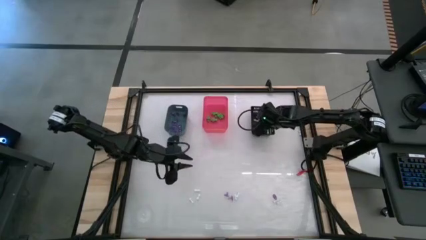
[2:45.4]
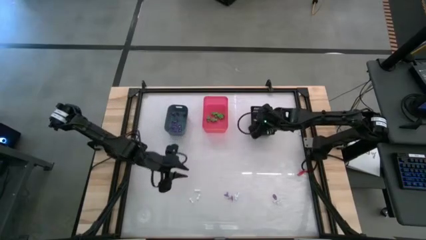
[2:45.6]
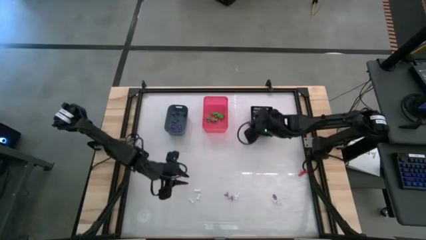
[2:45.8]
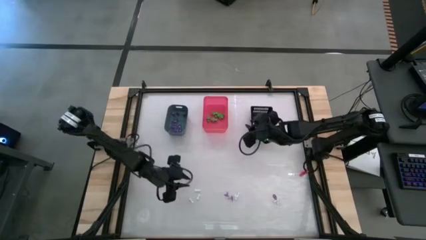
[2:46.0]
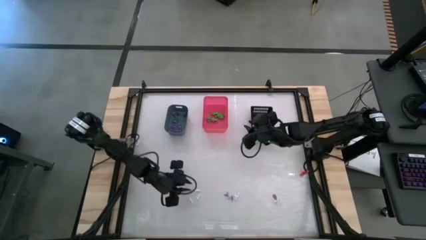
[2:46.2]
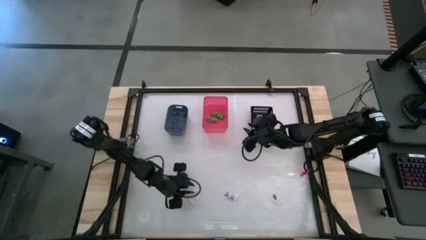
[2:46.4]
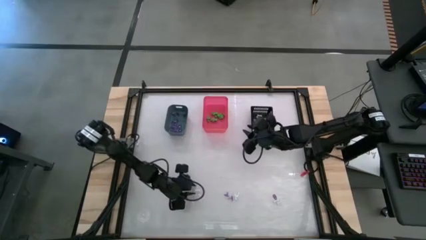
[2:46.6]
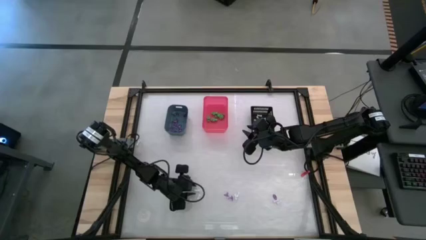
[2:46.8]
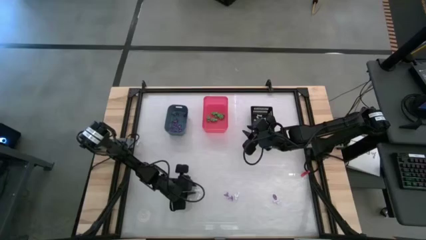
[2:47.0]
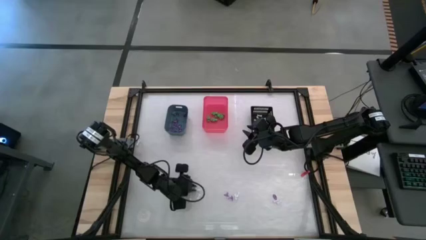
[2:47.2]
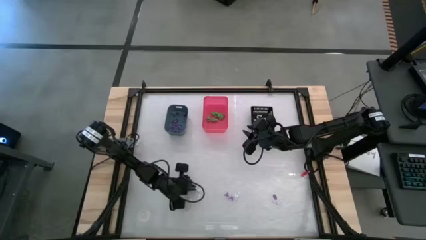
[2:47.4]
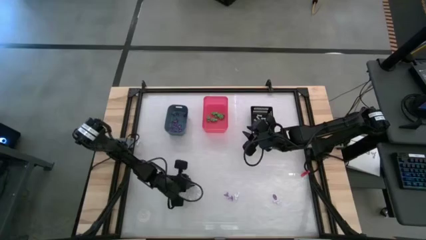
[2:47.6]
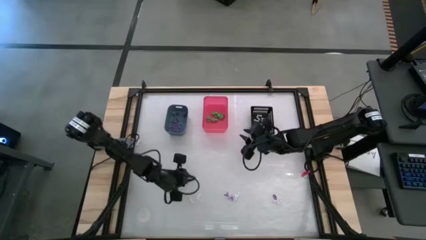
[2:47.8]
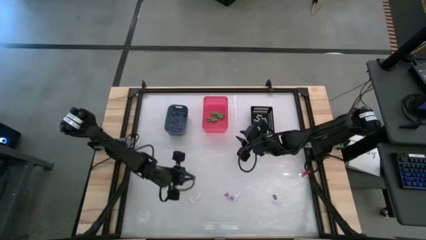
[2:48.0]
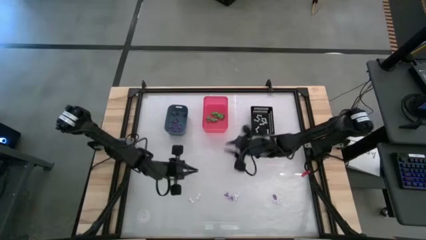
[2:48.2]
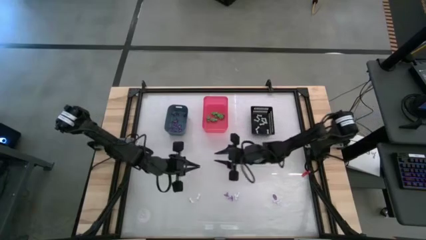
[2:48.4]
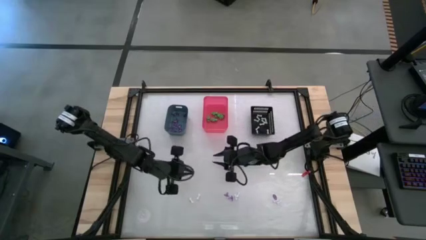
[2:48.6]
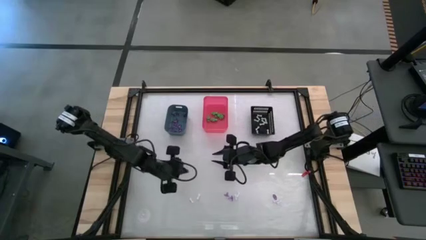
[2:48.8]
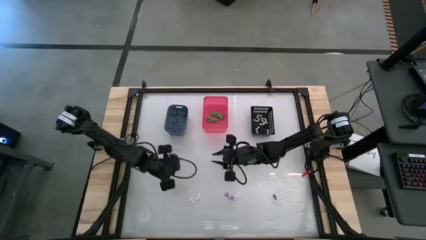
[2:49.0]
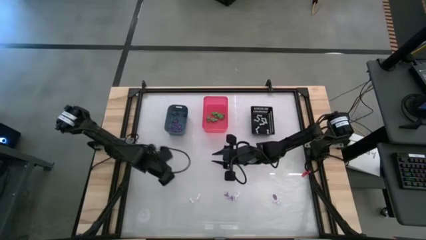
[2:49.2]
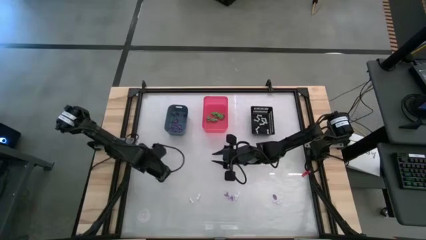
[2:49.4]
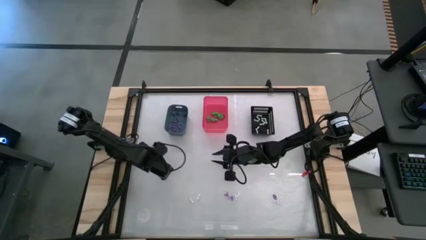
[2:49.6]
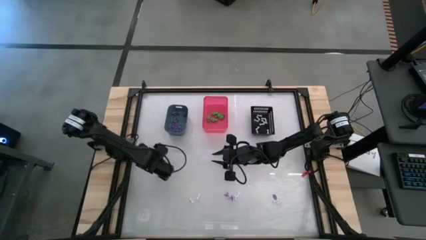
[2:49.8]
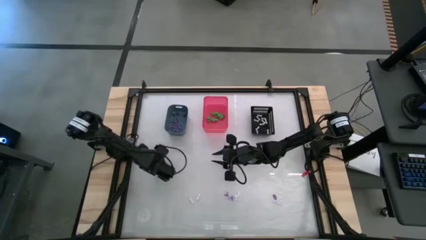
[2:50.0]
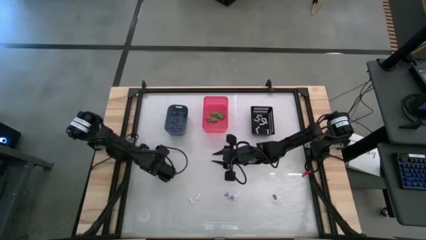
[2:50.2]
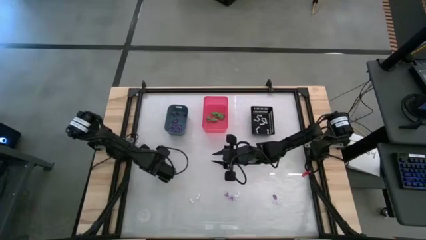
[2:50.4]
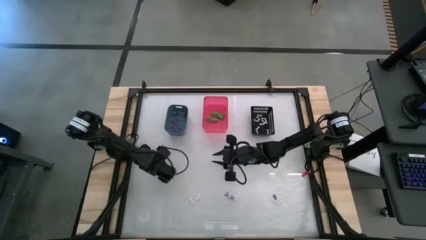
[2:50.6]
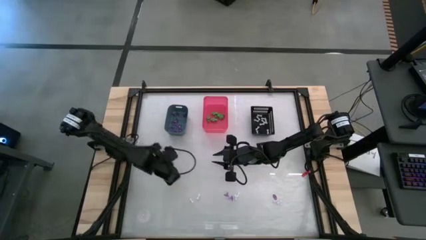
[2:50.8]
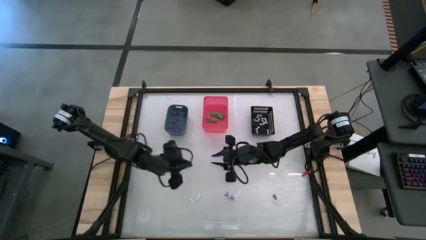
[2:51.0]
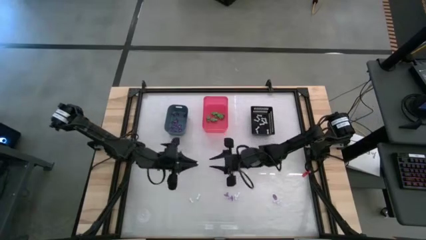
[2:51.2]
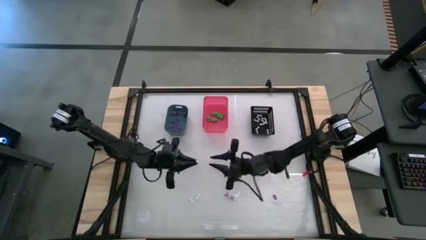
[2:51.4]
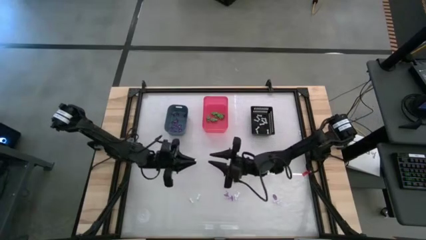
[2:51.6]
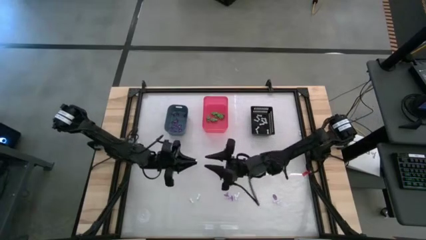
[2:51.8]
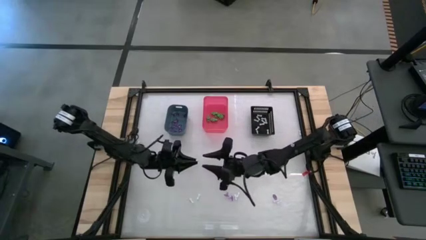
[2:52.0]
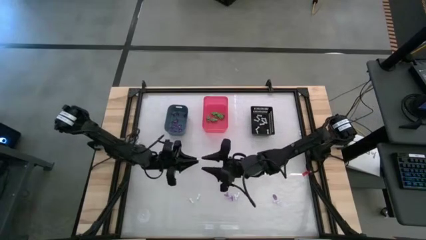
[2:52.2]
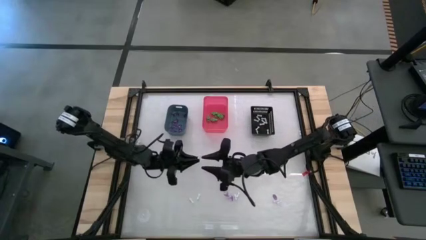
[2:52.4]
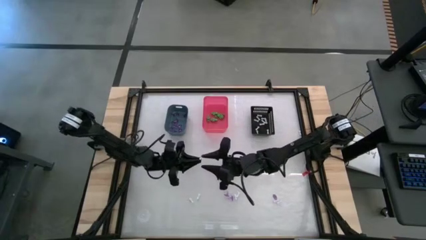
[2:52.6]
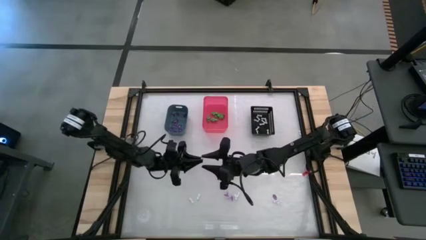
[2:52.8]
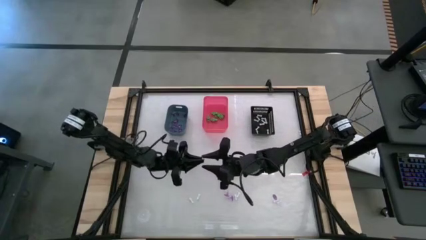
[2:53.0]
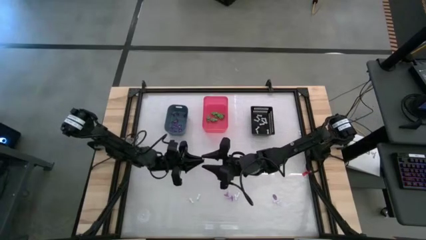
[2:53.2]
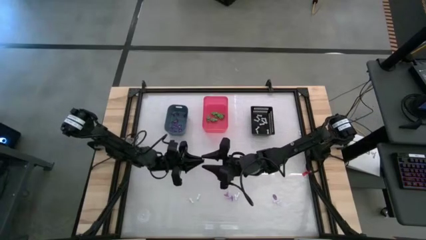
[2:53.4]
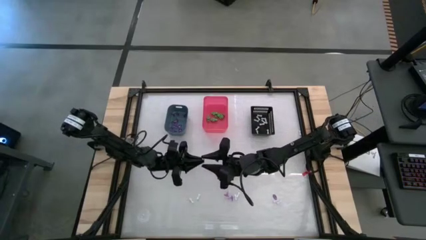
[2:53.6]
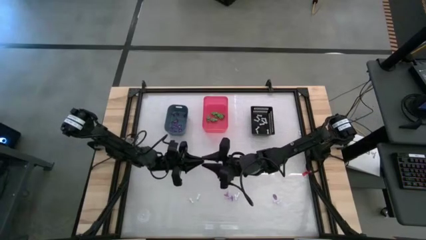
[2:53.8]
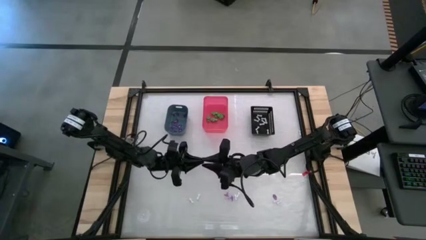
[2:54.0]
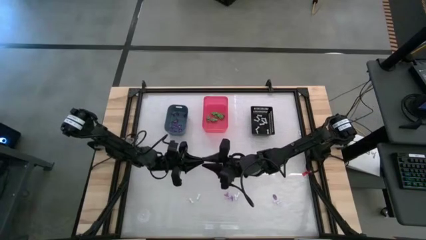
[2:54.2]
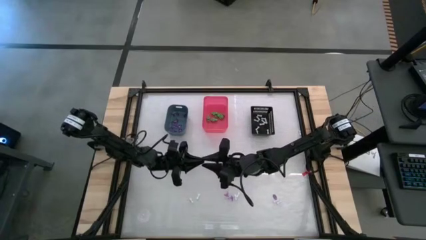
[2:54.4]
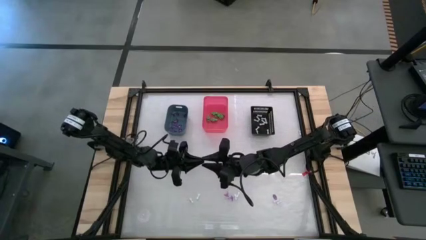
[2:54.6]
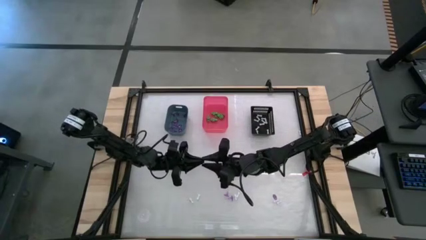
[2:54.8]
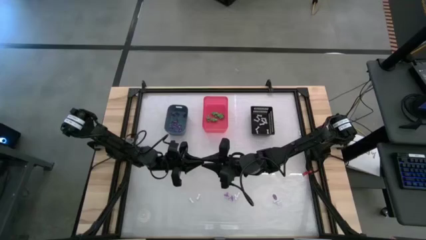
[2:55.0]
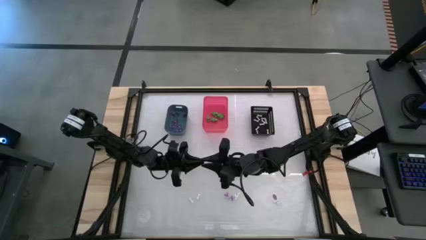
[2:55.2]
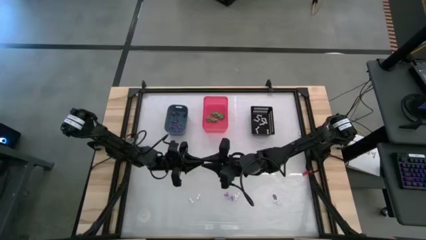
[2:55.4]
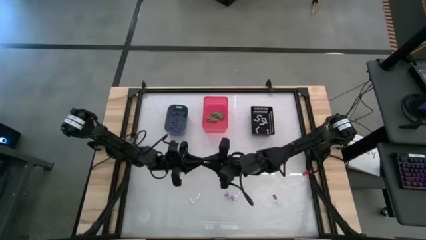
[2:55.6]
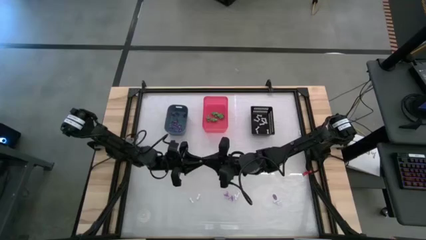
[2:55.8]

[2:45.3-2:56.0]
Task: Sort Halloween decoration
Put the white bone toy into the black bin

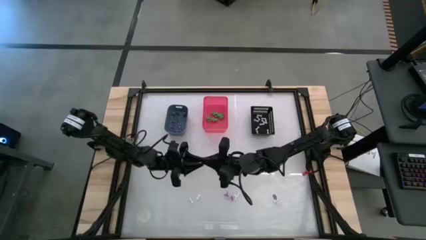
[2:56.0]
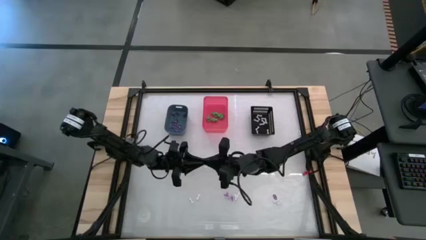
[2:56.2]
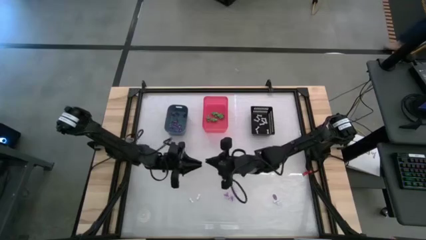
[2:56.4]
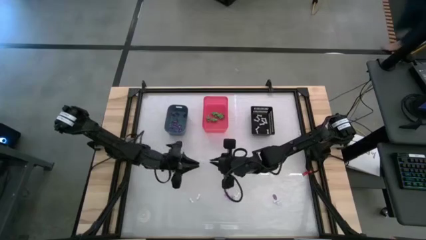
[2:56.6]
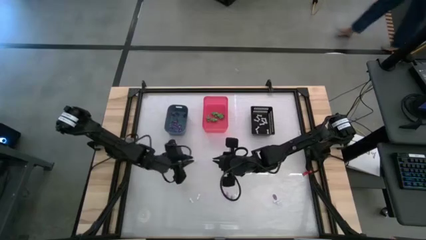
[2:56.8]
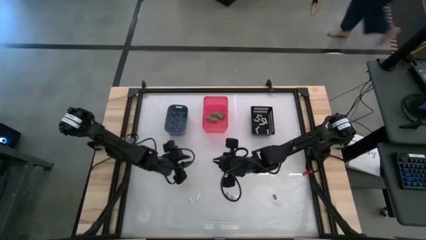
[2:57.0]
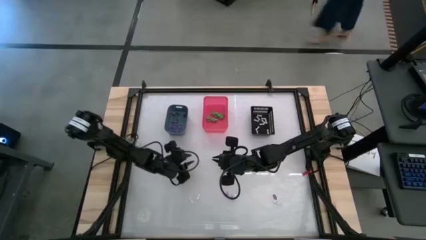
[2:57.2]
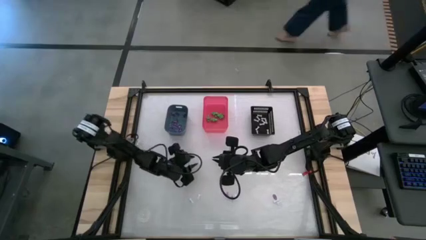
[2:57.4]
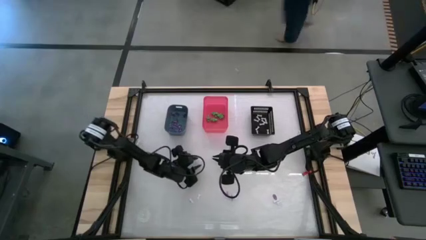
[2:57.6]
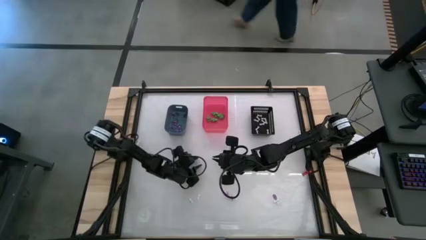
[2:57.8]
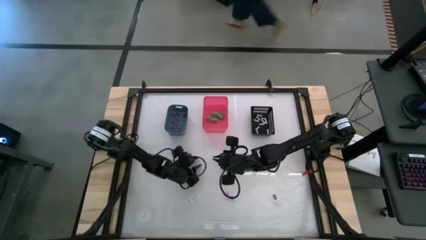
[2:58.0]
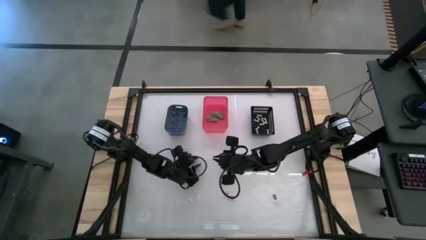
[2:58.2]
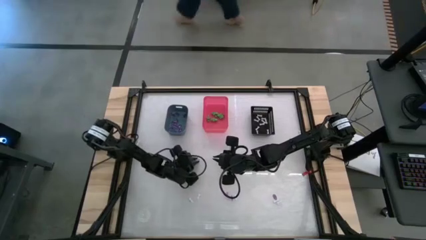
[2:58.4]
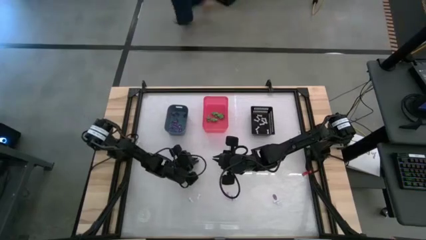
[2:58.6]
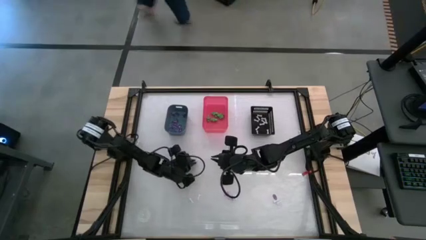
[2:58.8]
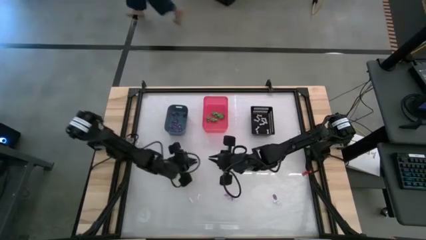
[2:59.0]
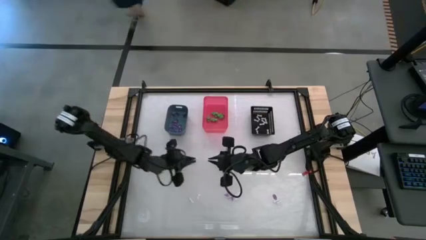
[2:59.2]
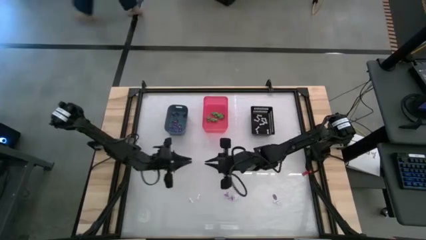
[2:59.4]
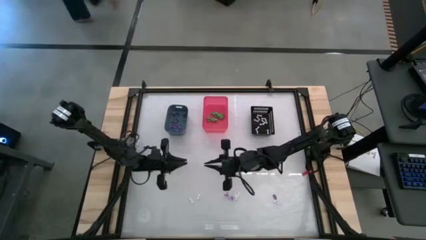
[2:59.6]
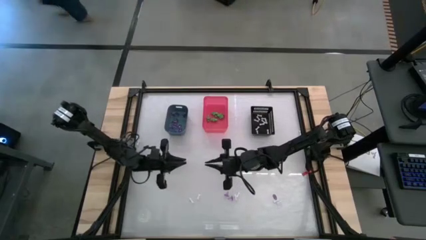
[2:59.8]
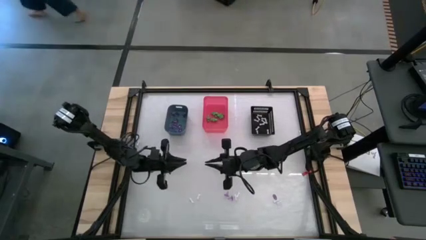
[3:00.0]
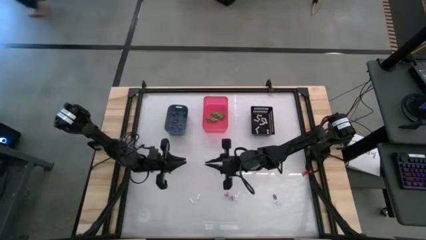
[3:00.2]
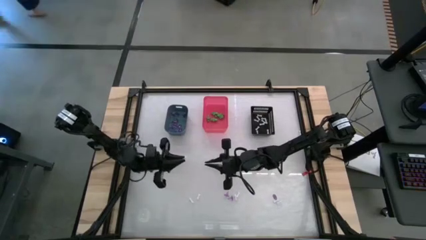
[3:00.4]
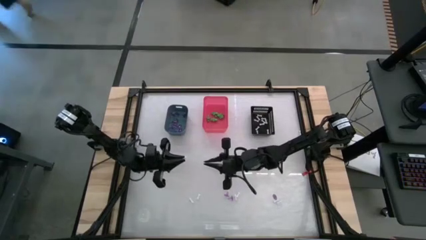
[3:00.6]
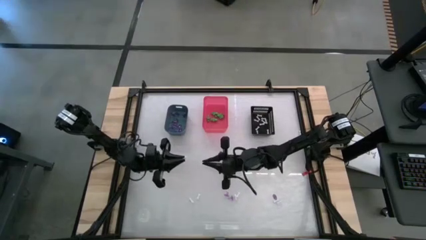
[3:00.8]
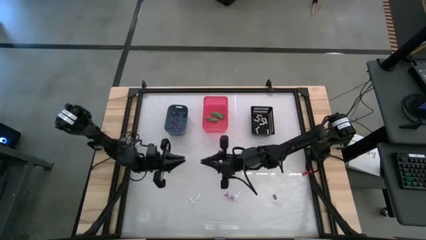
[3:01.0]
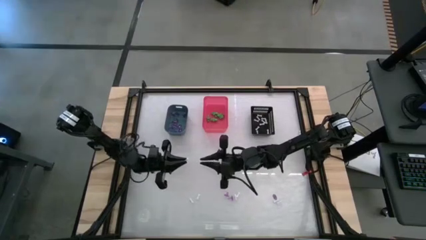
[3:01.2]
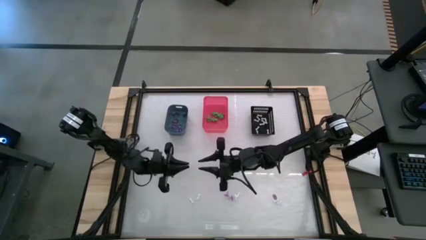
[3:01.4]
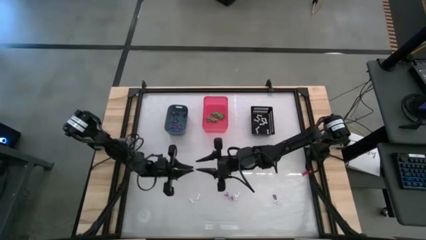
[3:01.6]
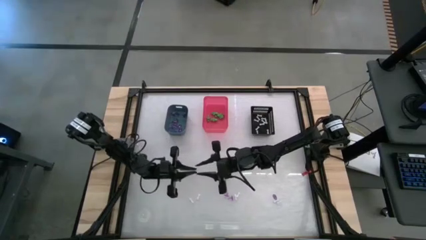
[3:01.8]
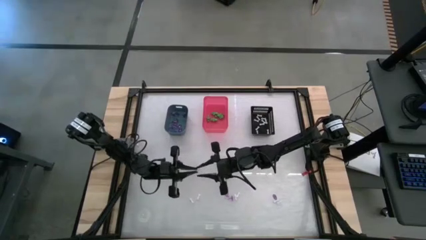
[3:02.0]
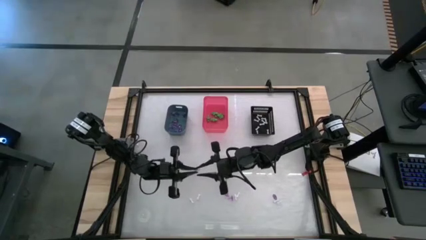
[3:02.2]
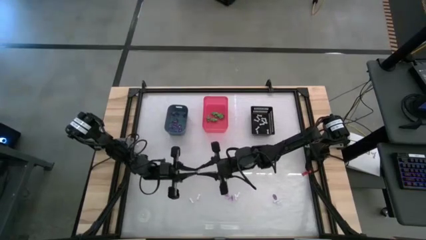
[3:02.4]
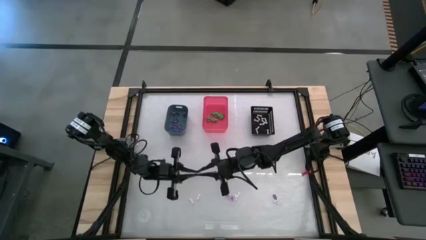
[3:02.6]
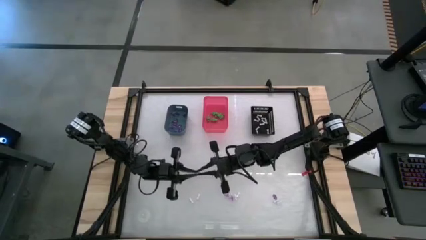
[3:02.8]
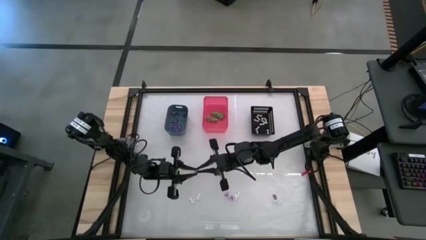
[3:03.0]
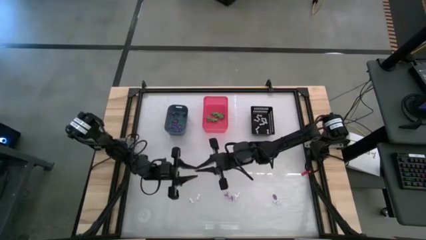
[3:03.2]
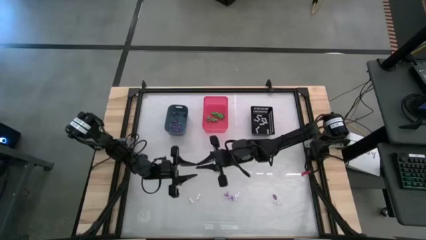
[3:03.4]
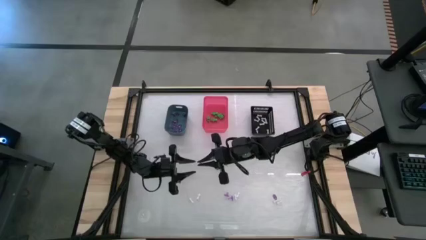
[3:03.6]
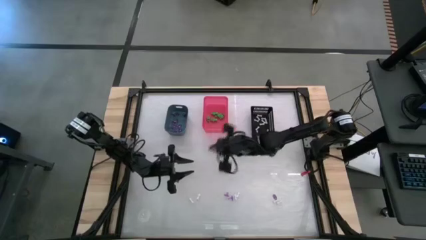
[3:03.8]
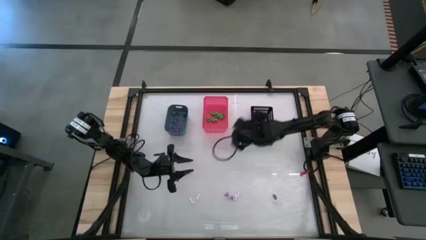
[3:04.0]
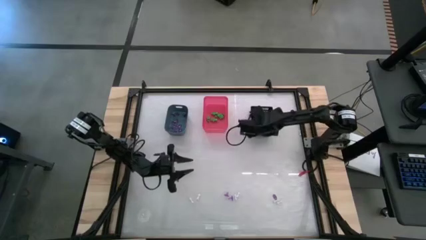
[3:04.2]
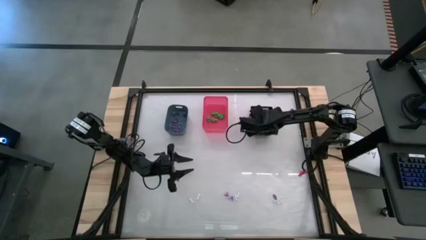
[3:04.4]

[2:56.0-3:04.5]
Put the white bone toy into the black bin
